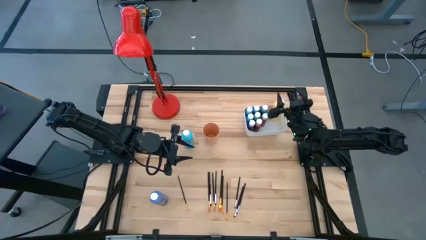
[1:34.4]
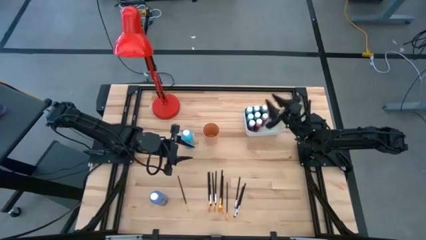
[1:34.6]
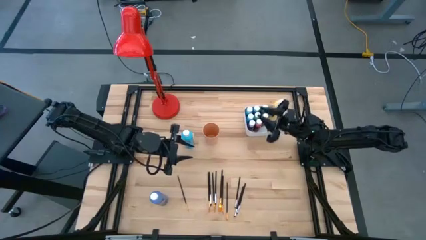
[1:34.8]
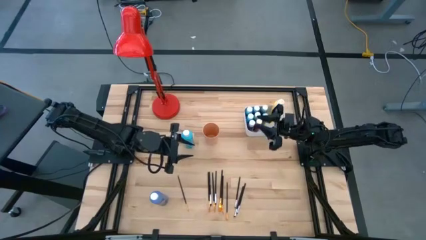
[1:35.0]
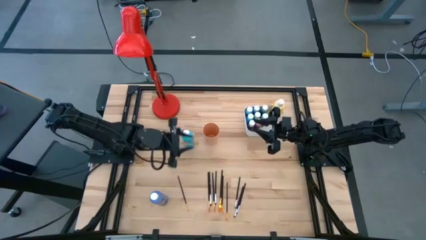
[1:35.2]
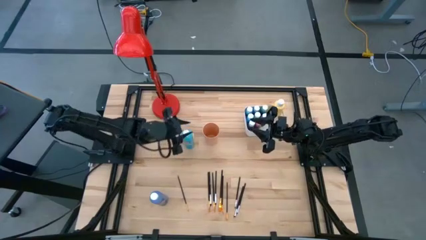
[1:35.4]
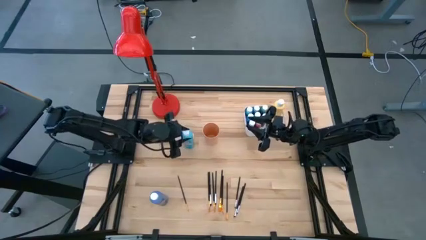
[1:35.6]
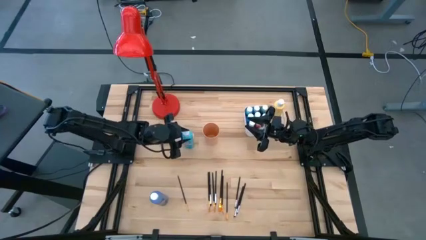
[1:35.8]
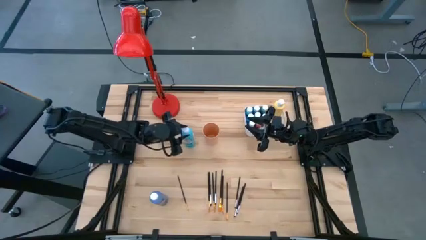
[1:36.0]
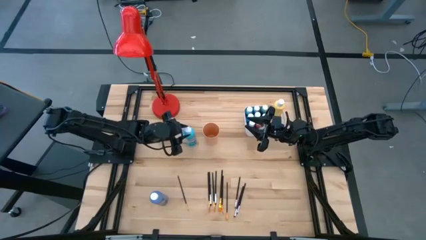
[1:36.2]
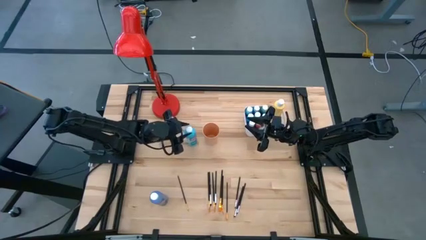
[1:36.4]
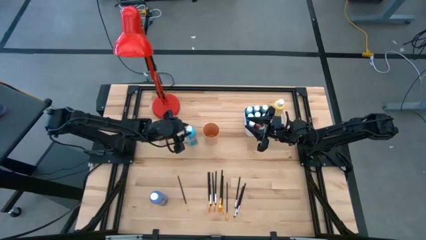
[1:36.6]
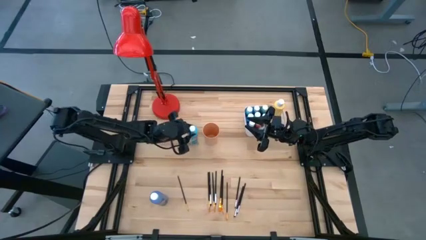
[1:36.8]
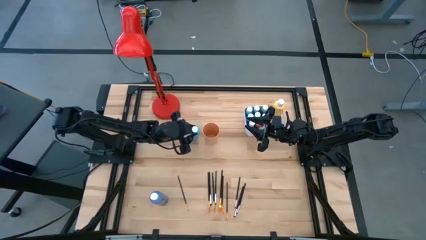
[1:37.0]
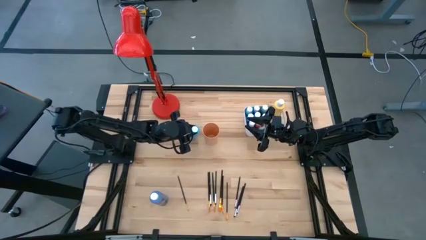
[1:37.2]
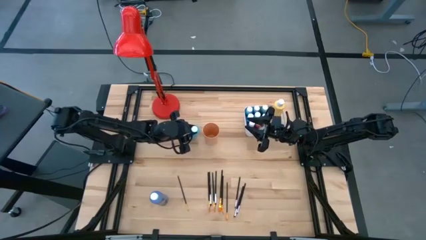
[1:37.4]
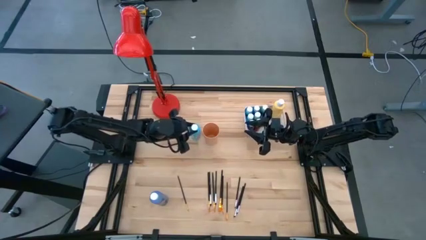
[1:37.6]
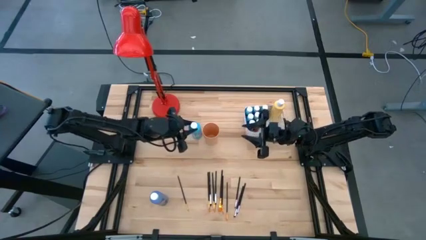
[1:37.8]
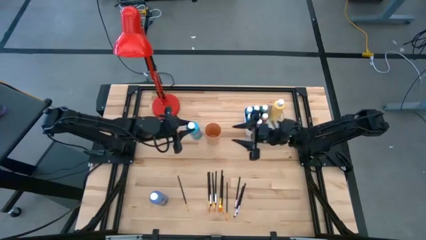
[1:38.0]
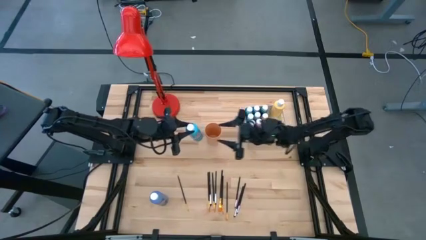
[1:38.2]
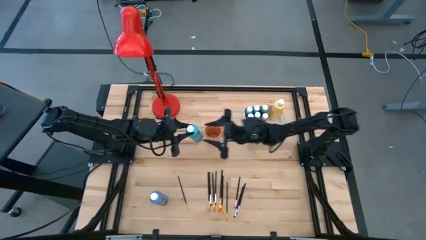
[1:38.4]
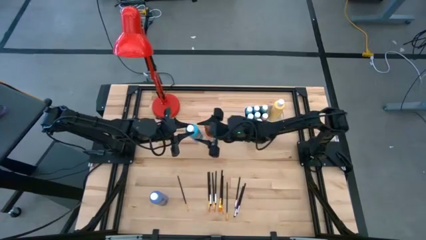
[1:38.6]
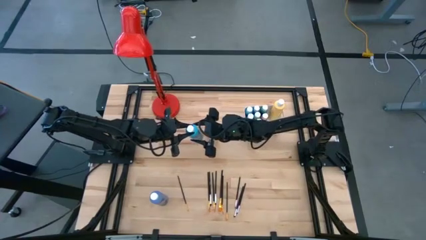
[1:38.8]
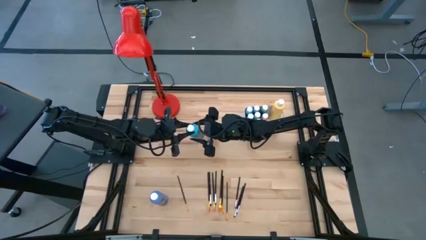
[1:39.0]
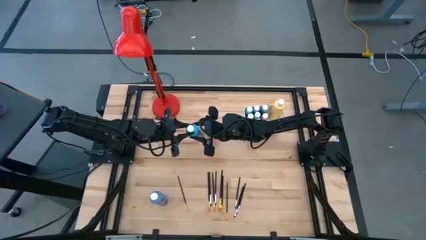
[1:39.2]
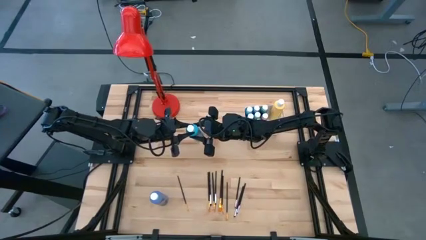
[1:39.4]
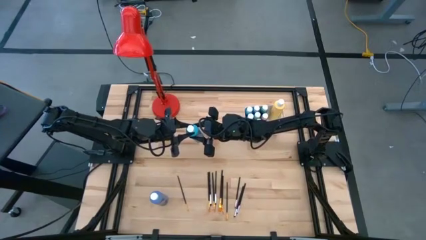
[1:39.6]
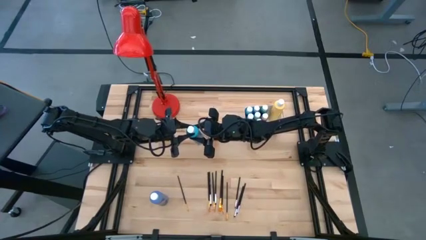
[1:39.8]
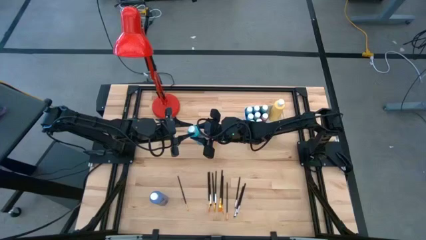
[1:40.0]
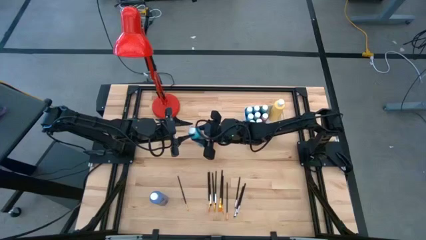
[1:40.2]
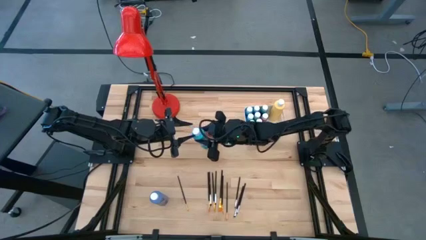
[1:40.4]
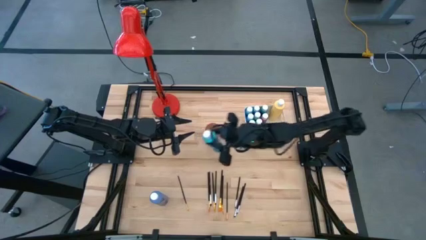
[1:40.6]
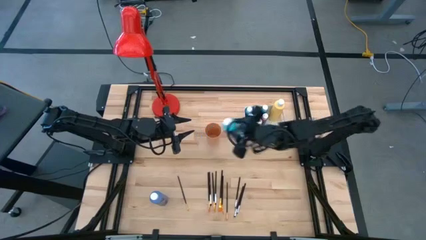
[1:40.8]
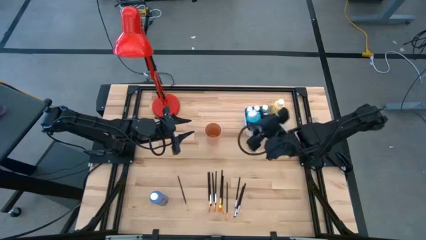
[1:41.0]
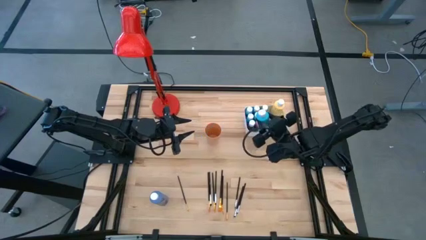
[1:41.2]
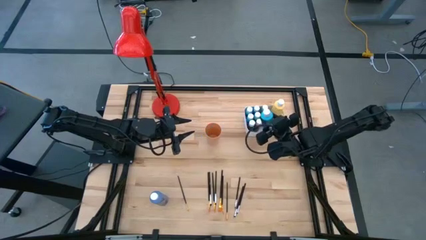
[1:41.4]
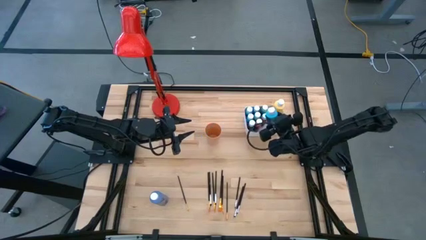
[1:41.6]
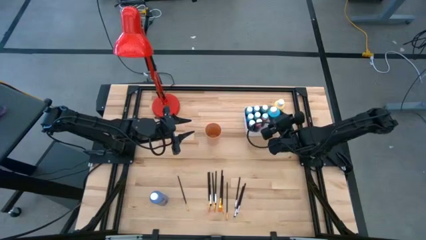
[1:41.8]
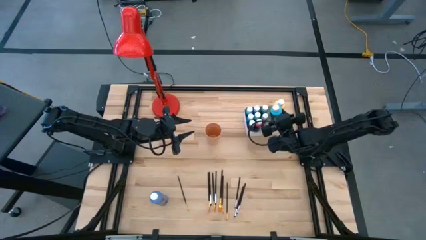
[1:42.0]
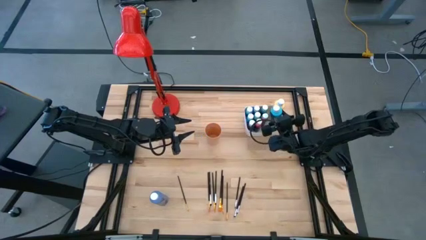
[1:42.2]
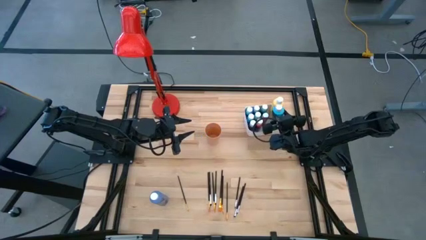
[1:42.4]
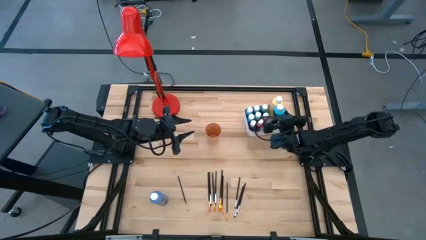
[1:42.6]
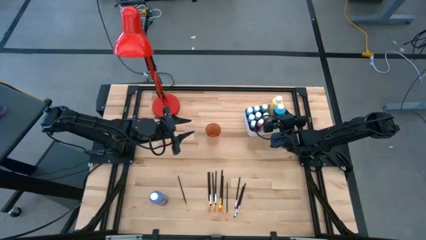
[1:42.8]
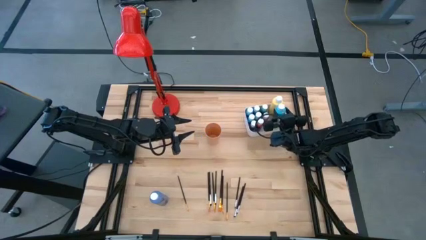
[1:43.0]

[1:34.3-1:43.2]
Task: Pick & Place Paint Supplies
Put the blue paint bottle into the white bin

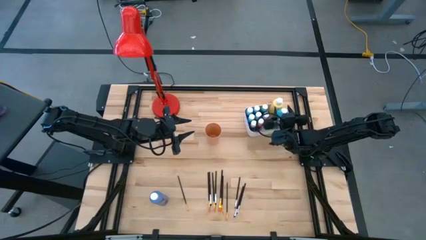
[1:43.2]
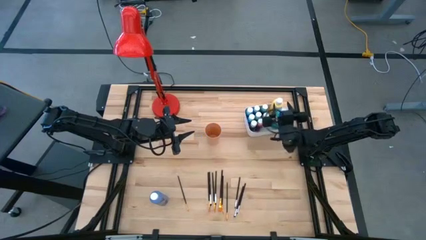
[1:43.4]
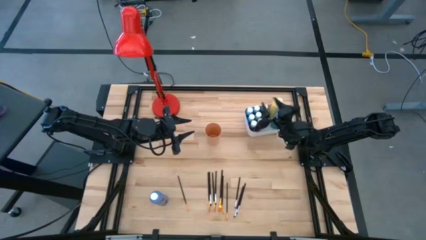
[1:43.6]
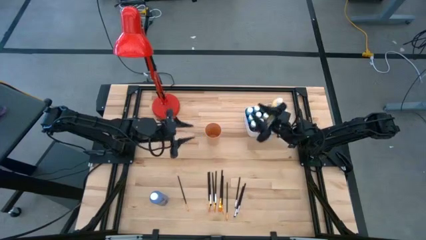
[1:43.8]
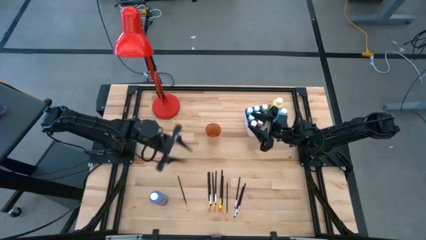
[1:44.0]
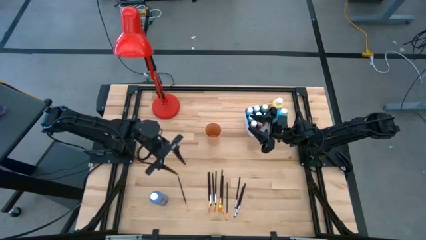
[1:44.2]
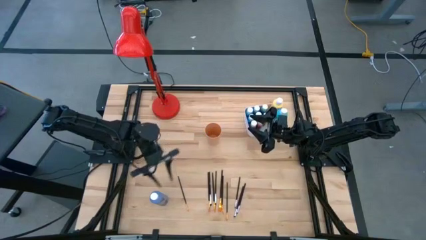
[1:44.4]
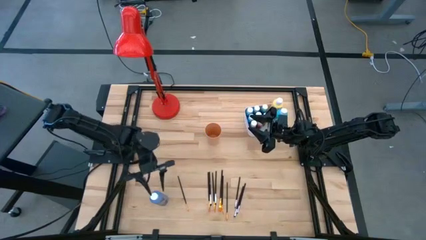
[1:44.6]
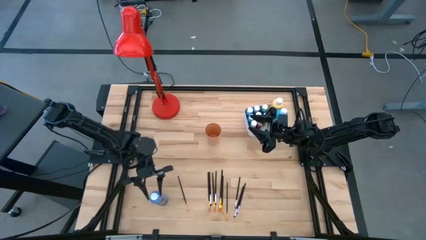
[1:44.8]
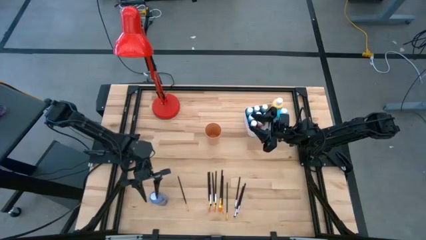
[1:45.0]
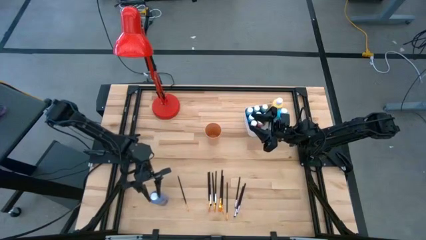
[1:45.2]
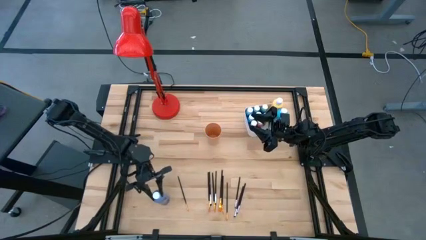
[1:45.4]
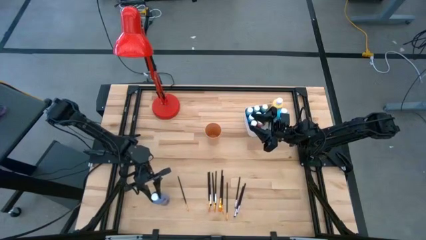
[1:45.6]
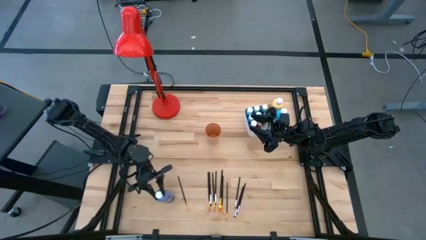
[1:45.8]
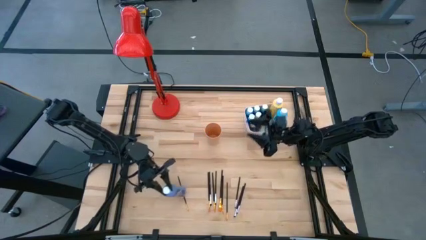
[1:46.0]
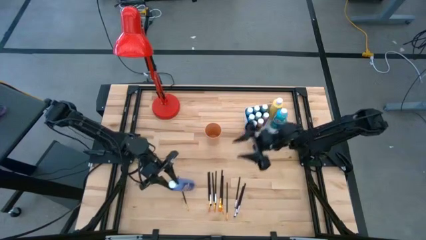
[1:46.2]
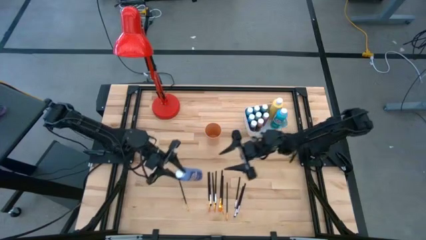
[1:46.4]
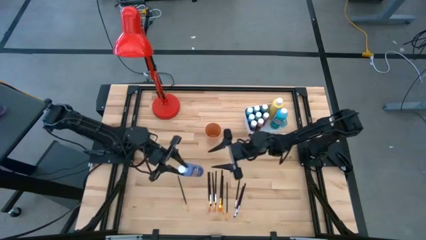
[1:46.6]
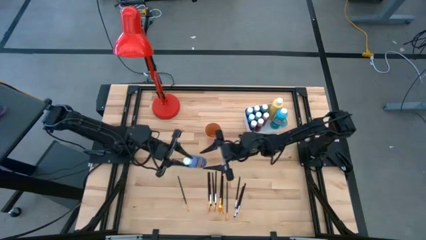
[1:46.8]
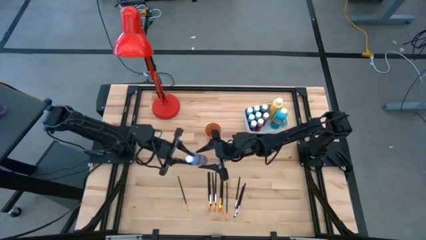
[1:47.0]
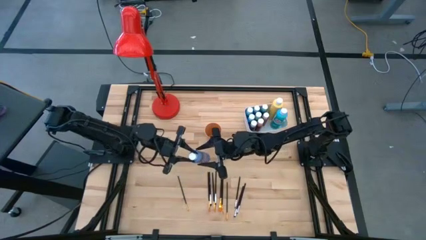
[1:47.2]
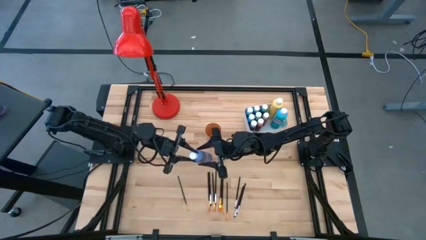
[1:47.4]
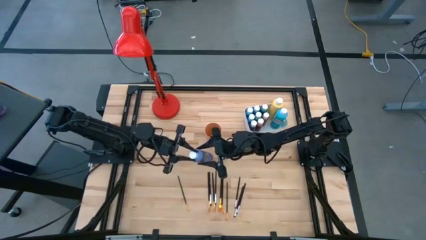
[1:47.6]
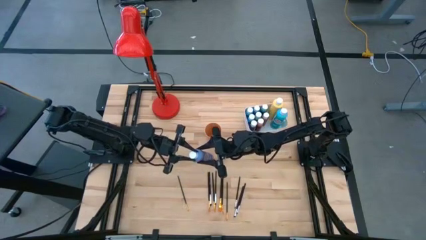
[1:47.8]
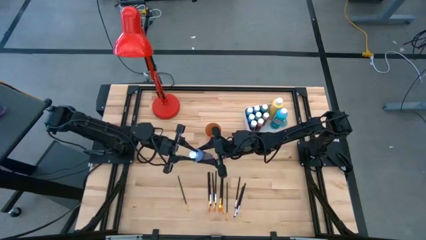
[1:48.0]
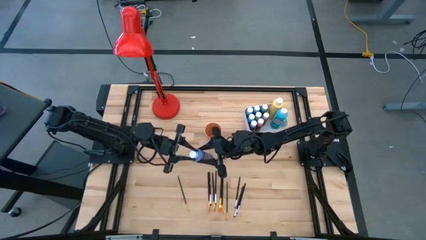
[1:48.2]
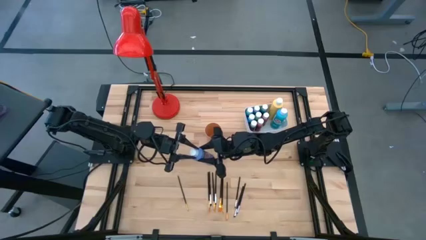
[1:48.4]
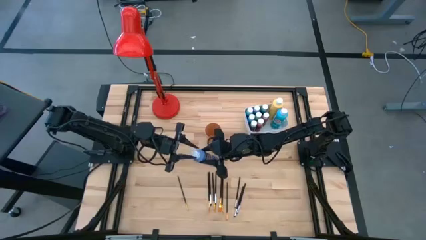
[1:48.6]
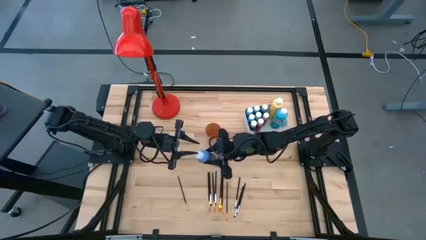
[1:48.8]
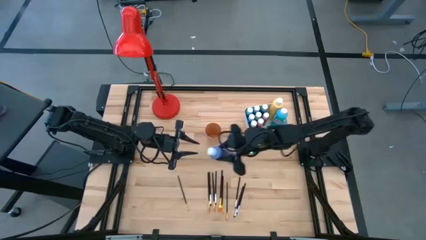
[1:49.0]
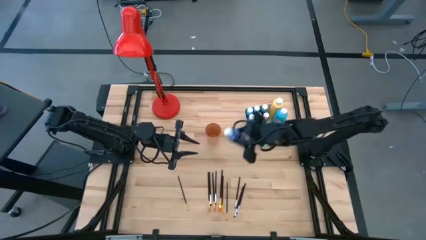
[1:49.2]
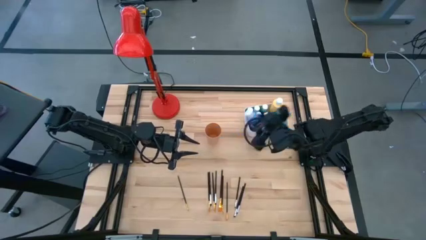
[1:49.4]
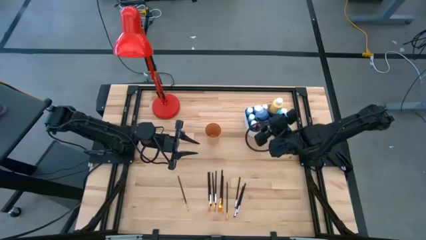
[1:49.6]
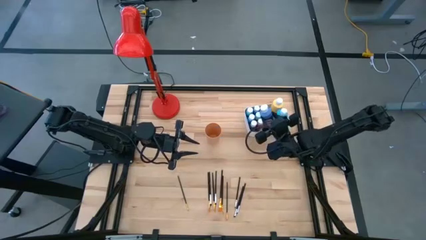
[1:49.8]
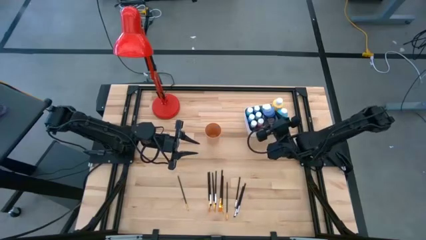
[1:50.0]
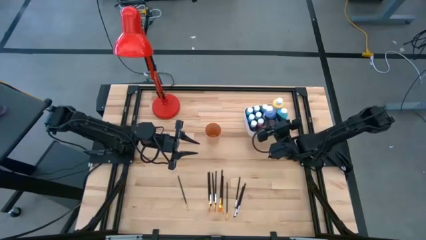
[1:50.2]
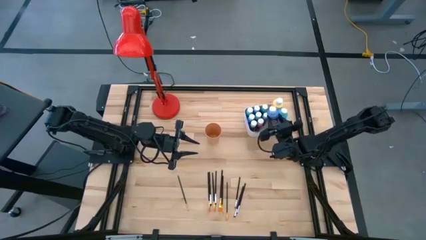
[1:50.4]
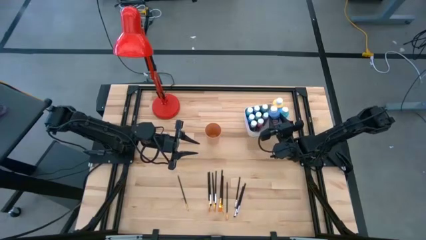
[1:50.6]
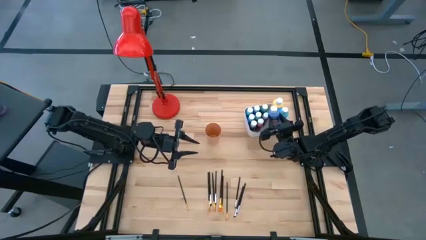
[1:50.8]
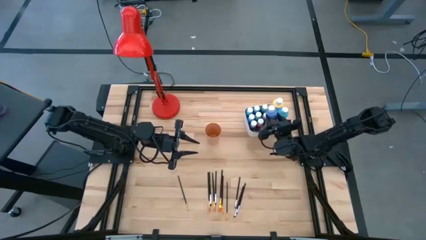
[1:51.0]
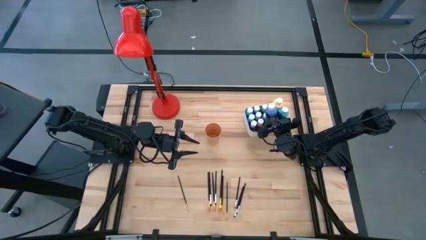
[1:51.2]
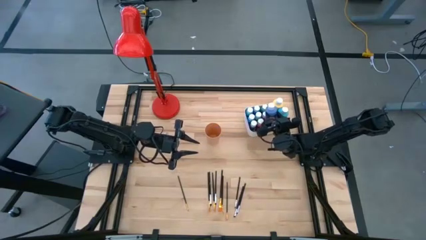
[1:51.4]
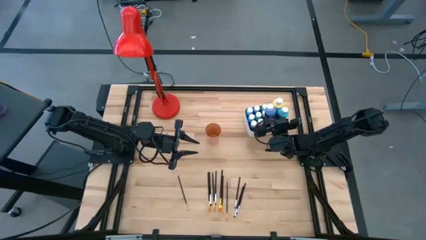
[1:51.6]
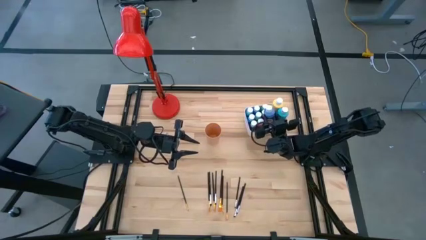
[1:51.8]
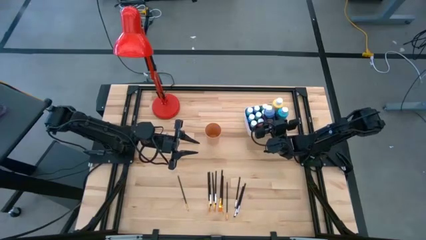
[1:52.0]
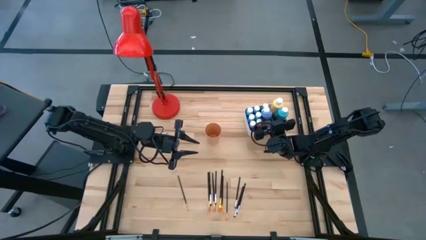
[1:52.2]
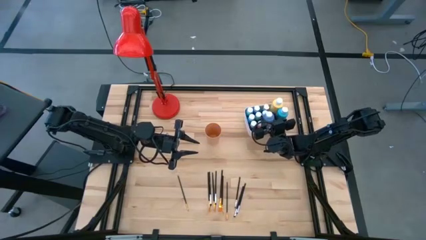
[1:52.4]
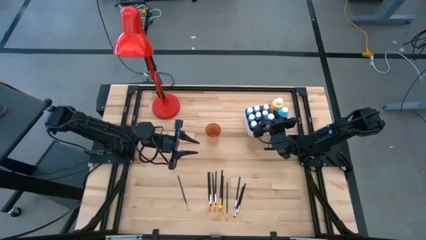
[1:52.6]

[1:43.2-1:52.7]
Put the purple paint bottle into the white bin
